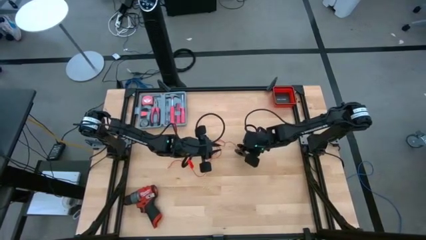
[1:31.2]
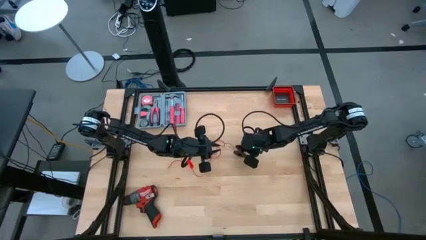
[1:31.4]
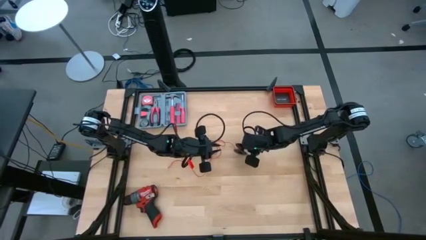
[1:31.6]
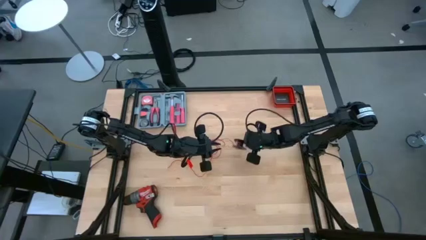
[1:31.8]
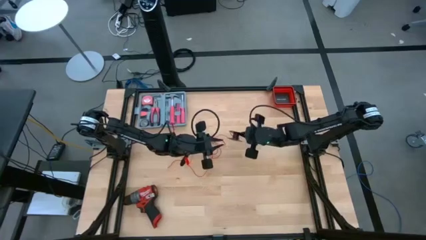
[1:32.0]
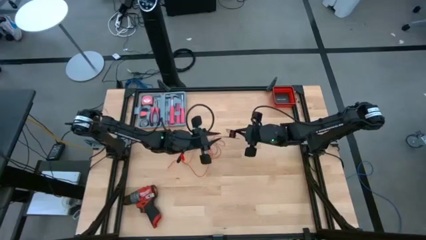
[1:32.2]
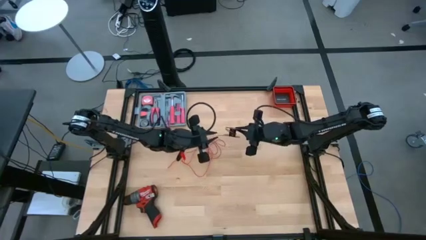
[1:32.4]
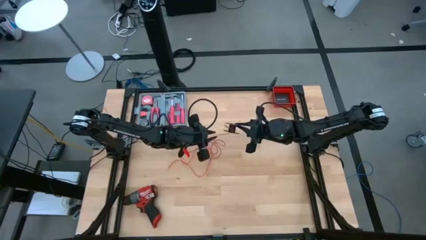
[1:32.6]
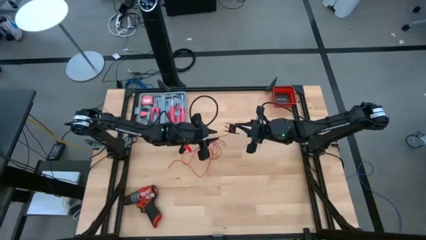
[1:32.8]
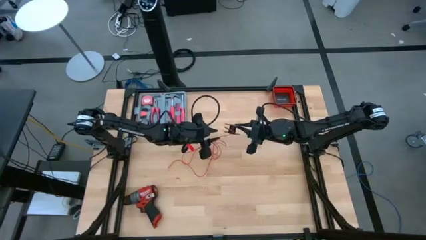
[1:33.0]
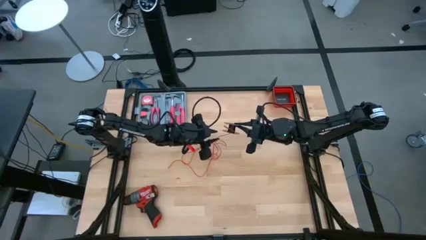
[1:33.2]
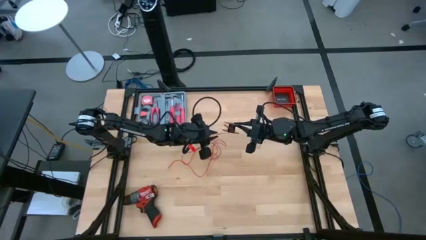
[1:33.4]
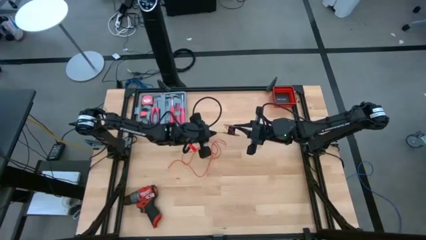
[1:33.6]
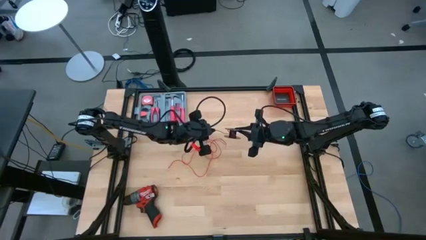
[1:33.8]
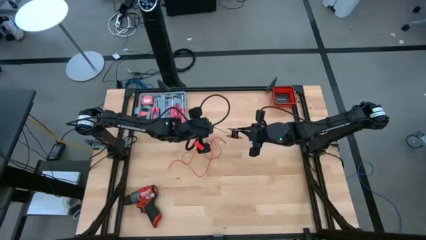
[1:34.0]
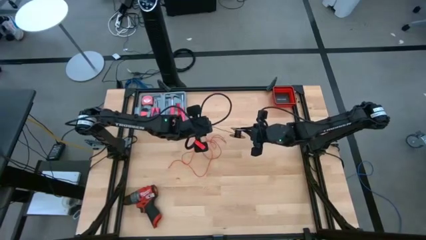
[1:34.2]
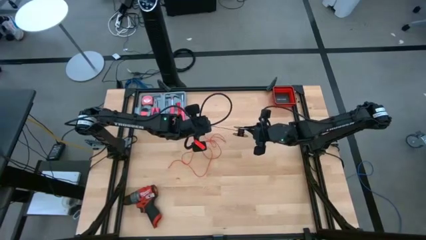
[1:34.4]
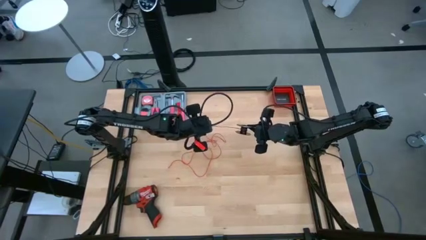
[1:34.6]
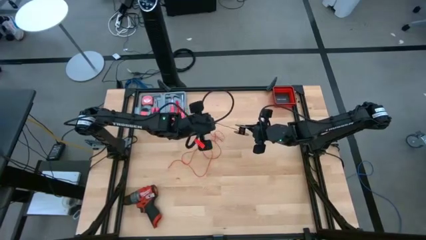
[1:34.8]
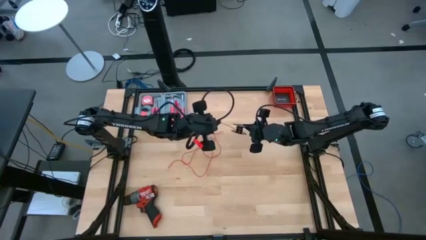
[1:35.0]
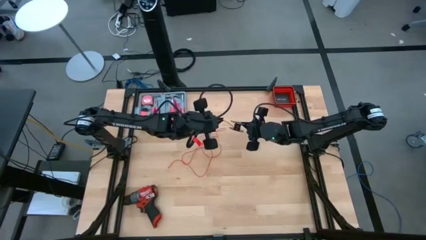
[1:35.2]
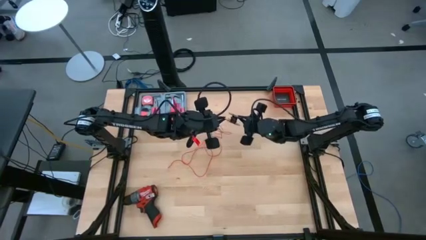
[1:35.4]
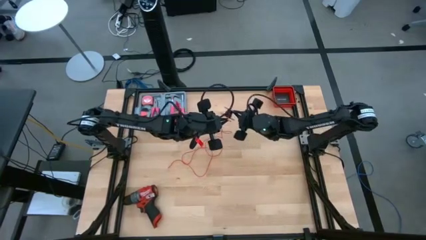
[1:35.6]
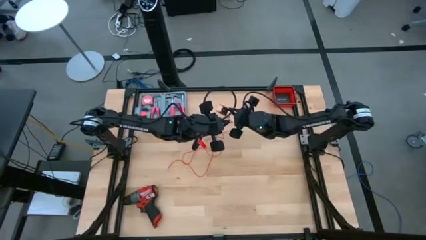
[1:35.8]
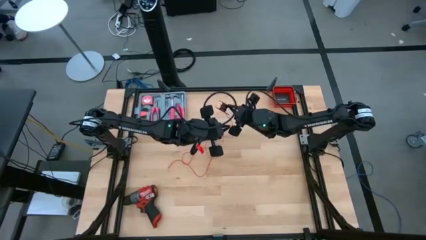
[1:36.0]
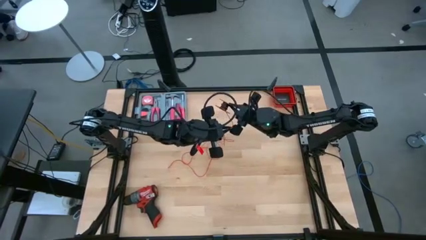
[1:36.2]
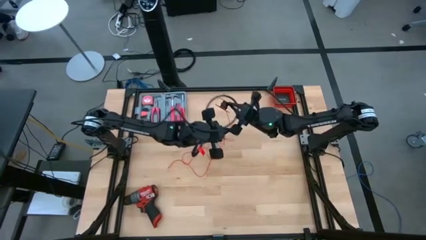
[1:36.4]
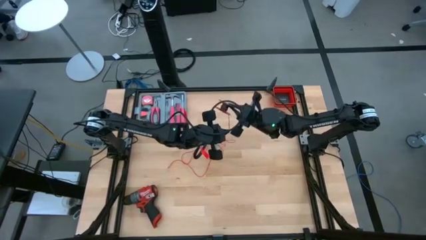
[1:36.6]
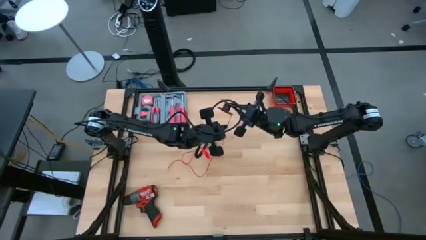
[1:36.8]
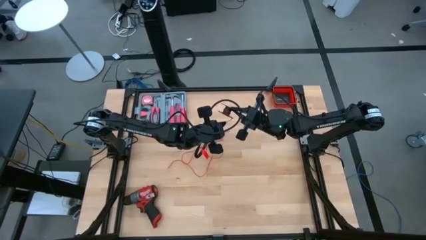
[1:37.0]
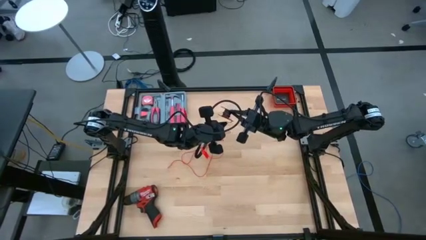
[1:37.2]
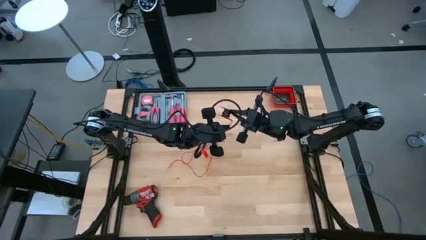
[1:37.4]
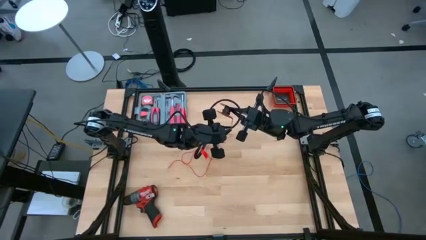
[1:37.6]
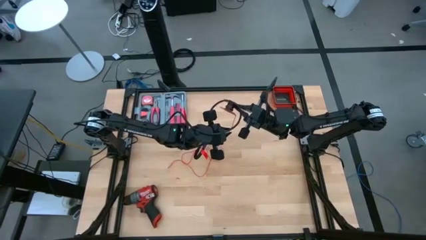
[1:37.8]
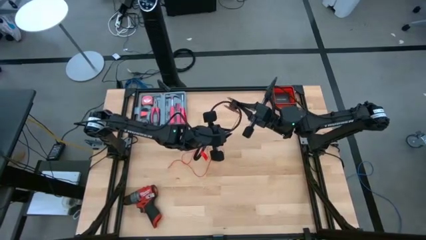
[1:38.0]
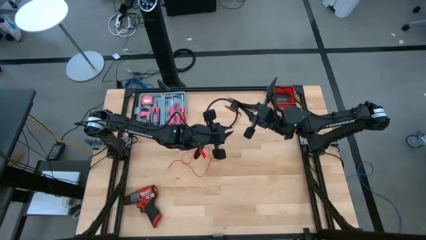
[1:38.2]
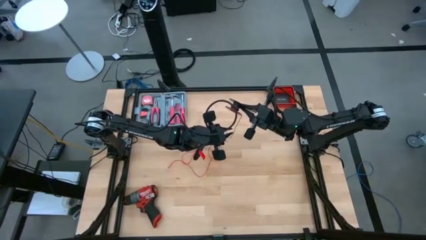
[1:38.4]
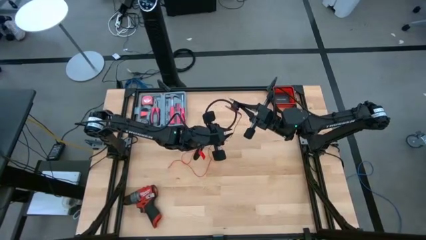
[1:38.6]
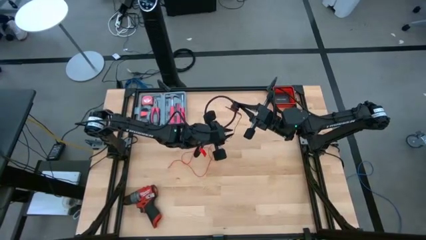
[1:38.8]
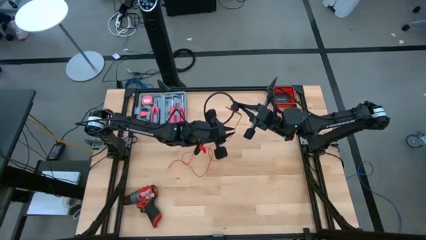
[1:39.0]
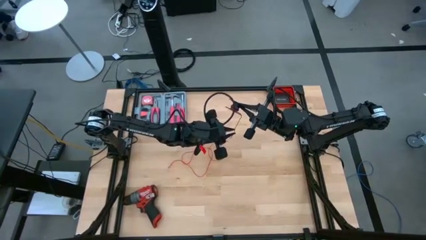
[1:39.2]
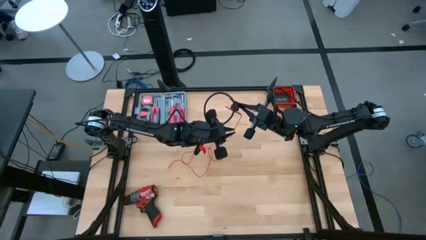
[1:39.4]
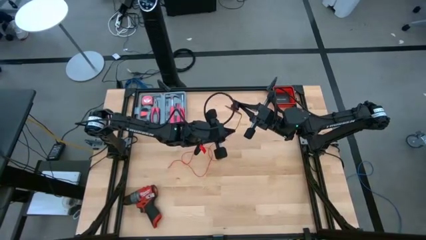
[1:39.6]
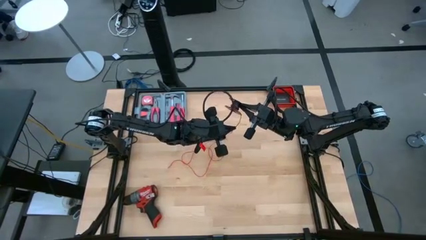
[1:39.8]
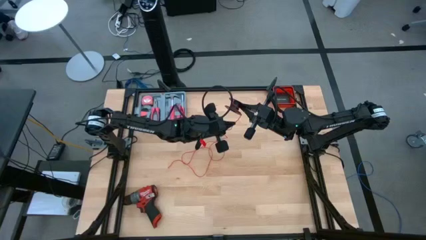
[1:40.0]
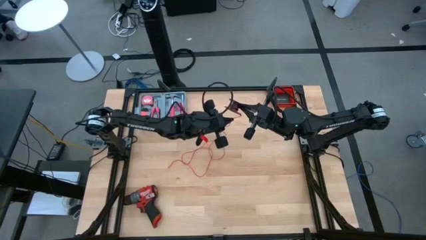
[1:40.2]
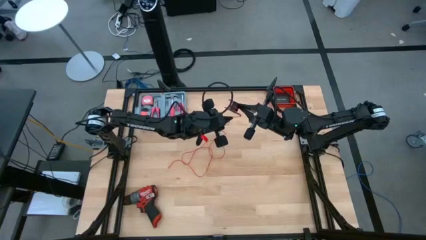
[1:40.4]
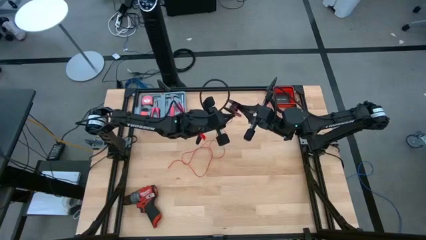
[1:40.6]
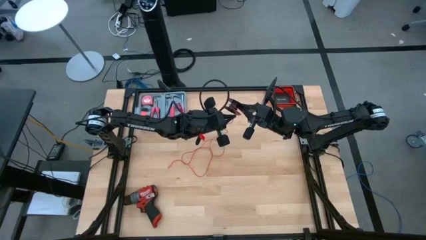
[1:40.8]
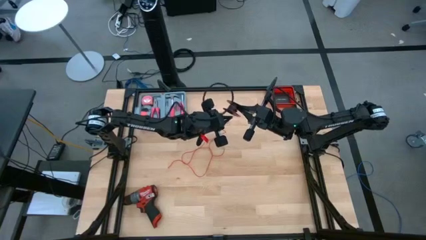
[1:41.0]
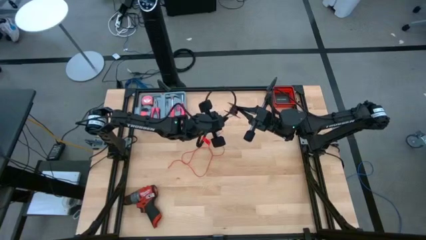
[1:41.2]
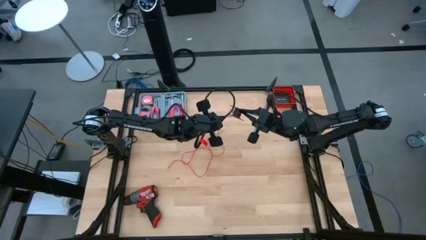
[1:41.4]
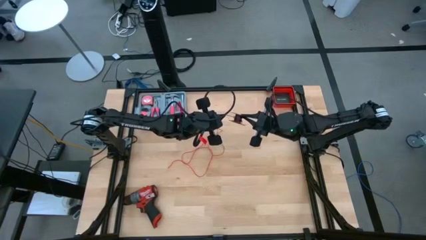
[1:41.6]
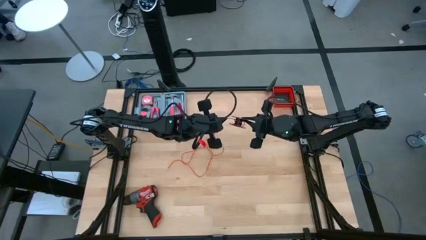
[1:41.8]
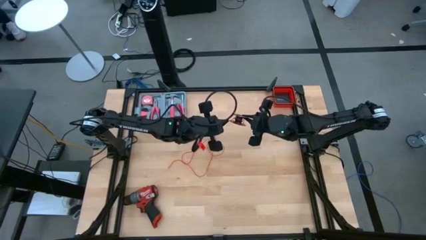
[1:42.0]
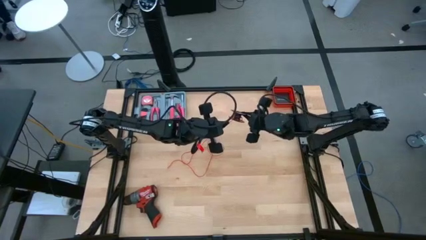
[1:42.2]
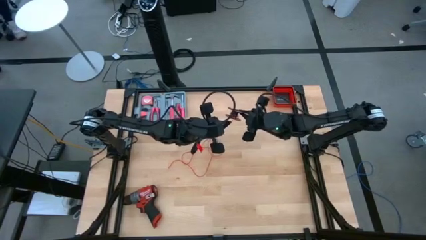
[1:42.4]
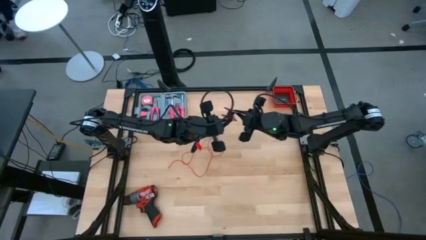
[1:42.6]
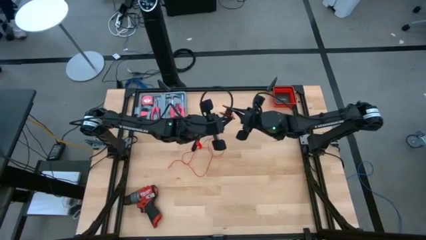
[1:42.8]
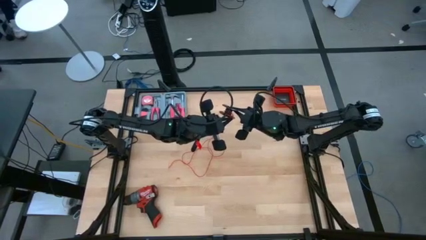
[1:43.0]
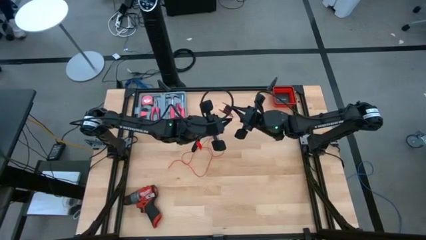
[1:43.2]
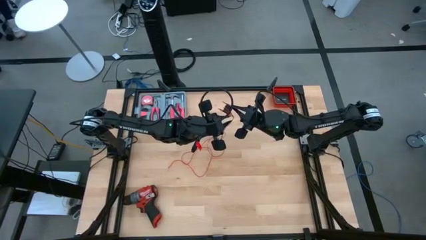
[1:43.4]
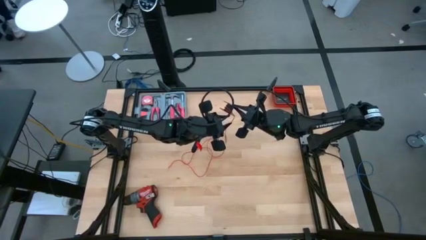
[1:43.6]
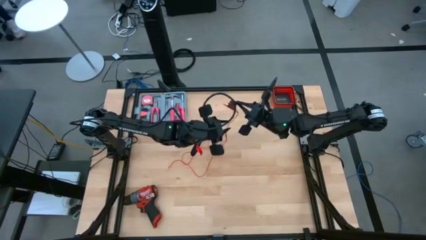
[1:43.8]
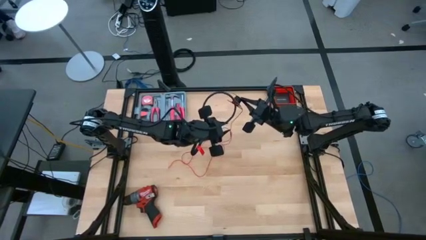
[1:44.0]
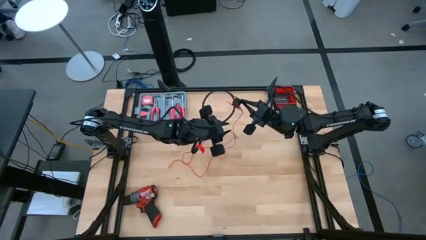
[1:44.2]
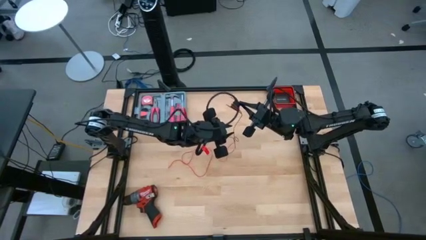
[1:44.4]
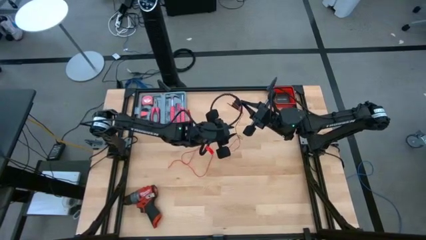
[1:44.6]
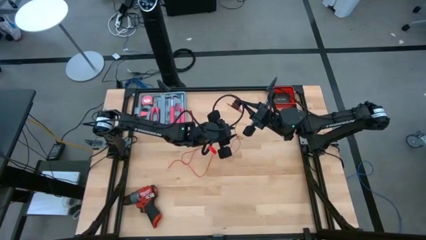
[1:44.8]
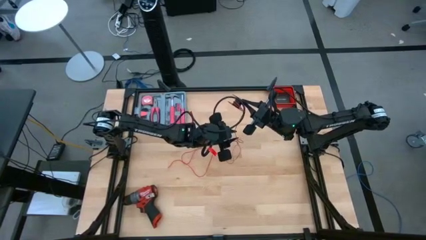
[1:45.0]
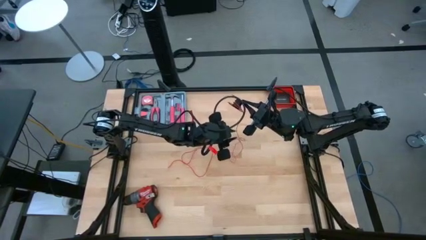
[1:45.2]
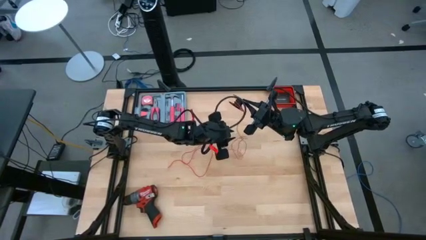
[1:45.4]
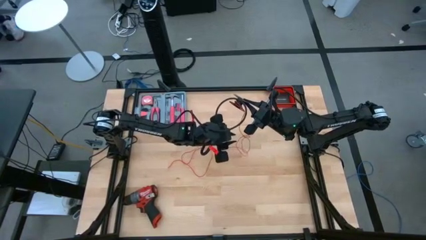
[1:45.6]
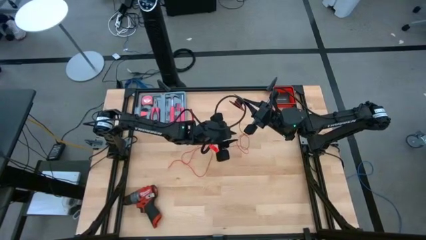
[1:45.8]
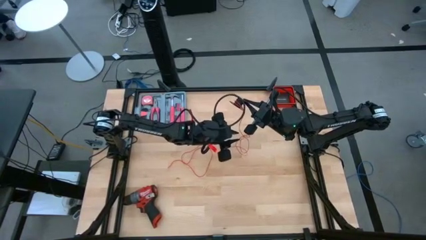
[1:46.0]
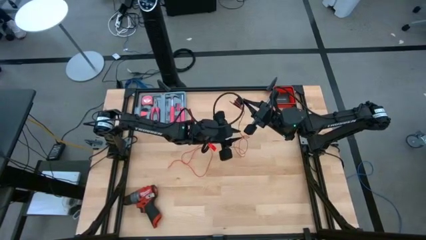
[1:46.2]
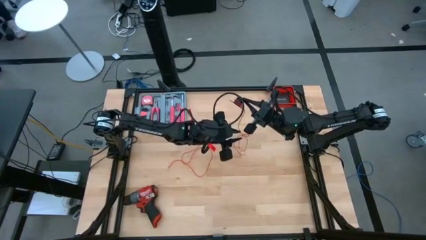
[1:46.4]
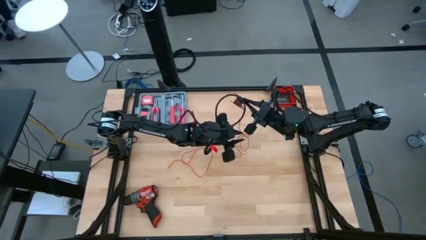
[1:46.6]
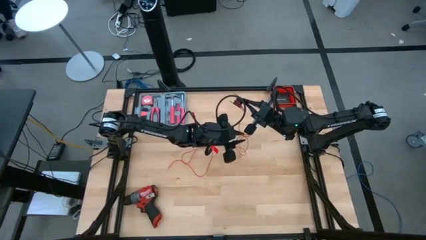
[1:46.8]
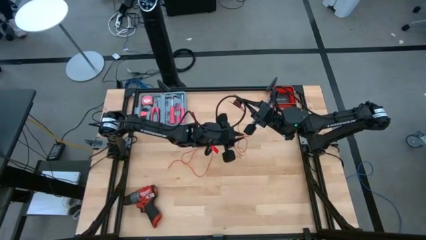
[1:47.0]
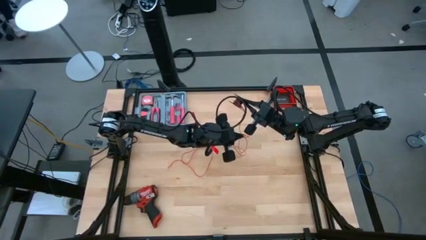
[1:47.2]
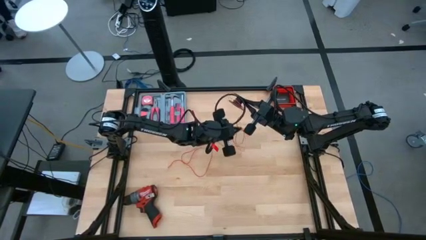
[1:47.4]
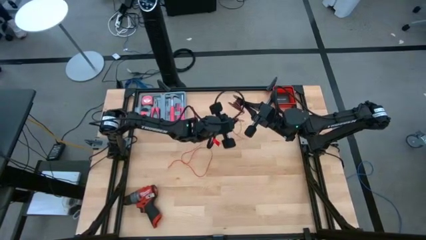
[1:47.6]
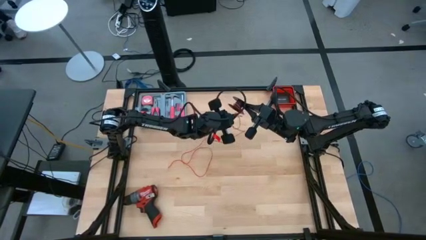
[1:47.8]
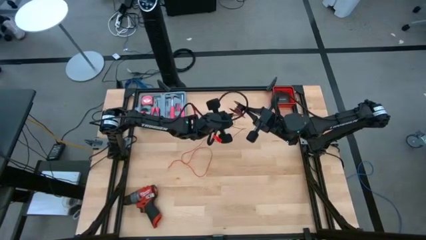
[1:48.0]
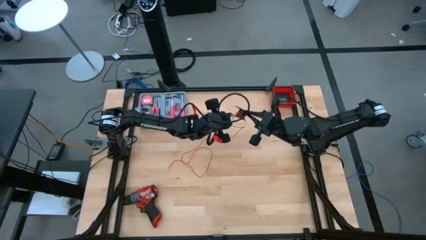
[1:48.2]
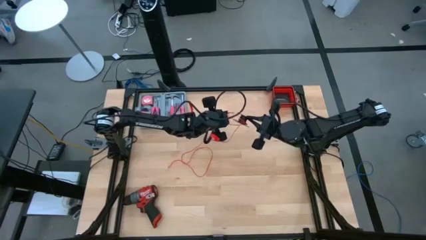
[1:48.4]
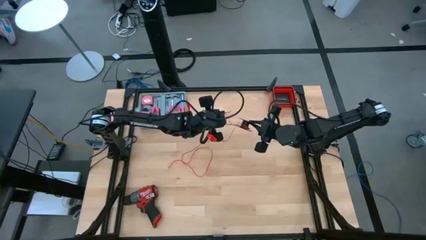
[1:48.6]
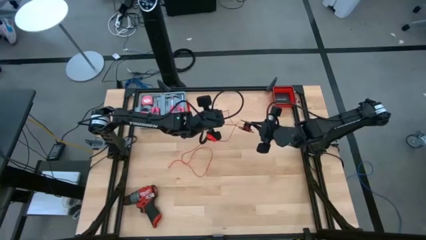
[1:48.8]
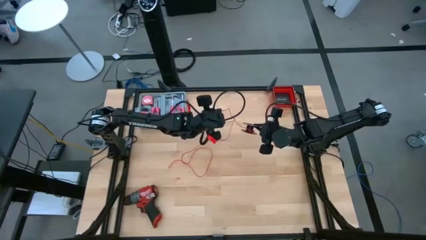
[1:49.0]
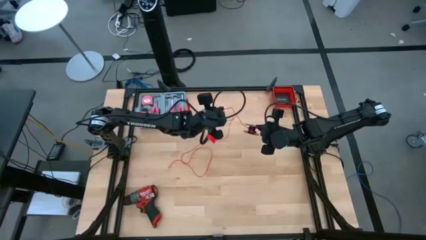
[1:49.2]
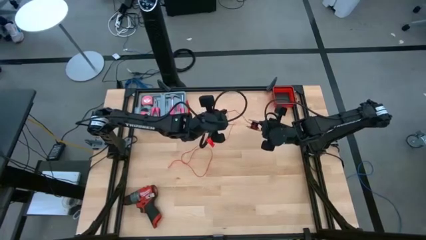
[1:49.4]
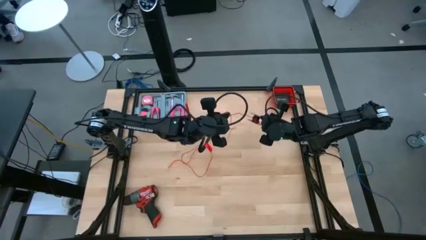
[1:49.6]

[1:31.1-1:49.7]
Task: Coil cords
Coil the red wire on the black spool
